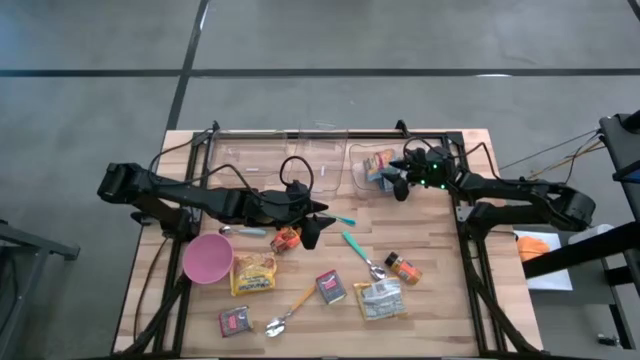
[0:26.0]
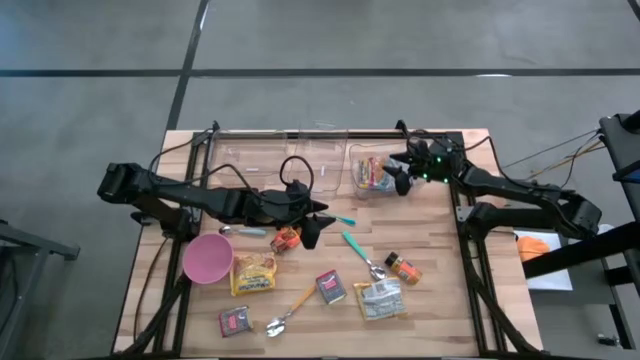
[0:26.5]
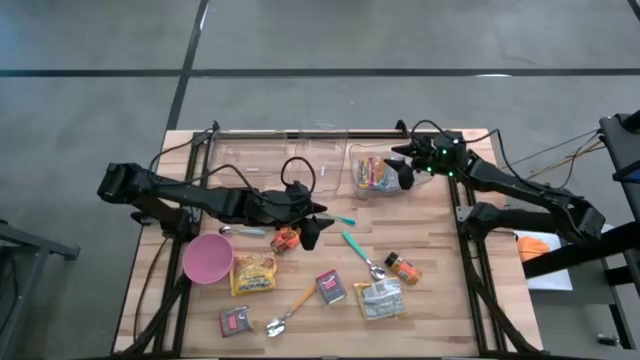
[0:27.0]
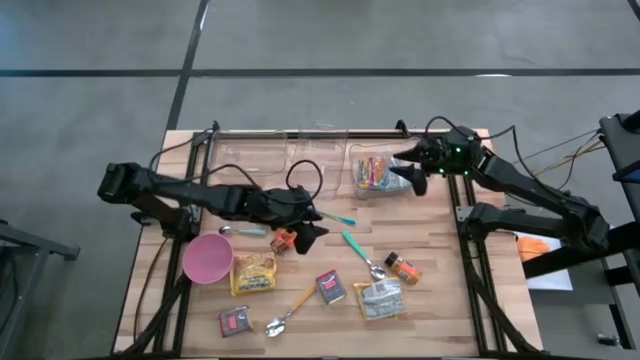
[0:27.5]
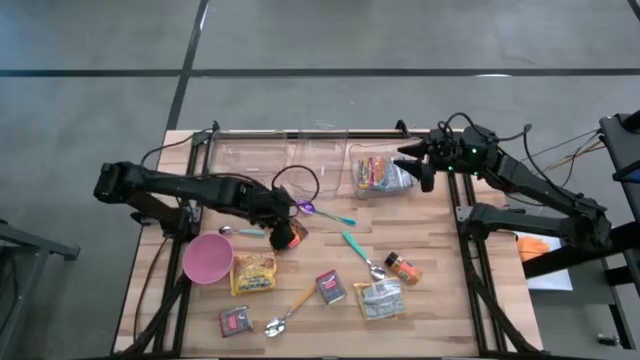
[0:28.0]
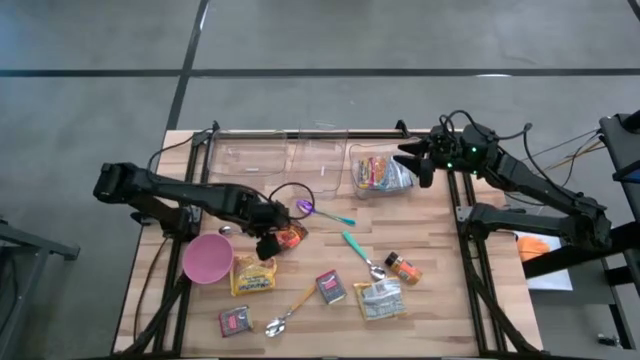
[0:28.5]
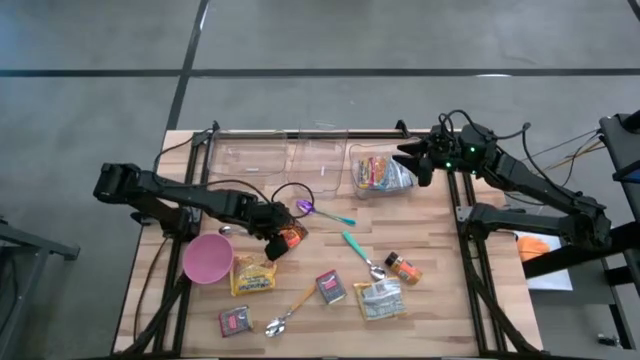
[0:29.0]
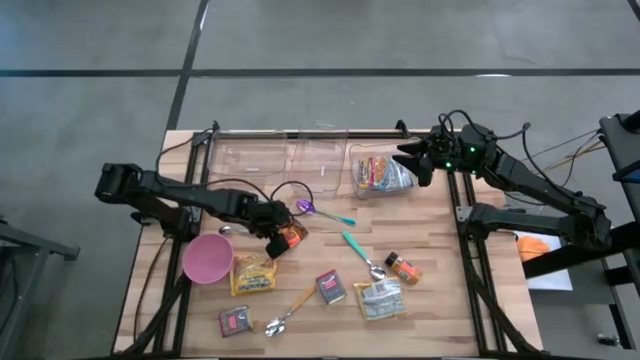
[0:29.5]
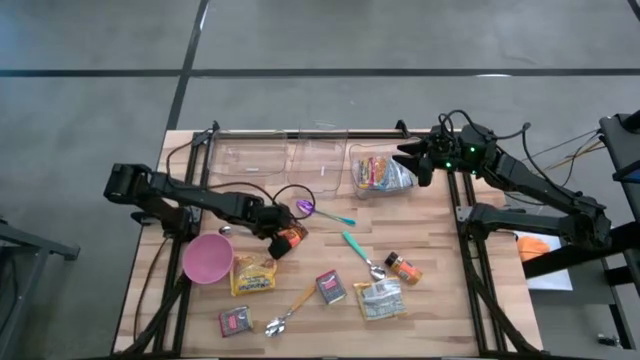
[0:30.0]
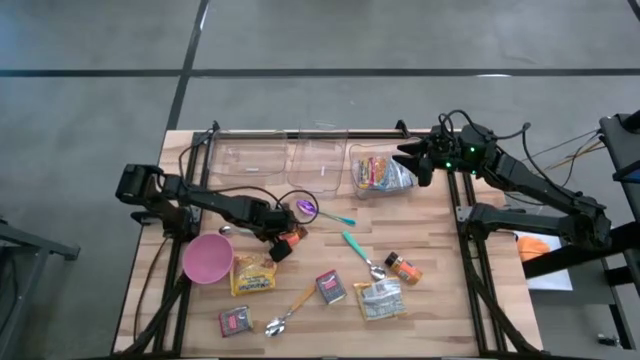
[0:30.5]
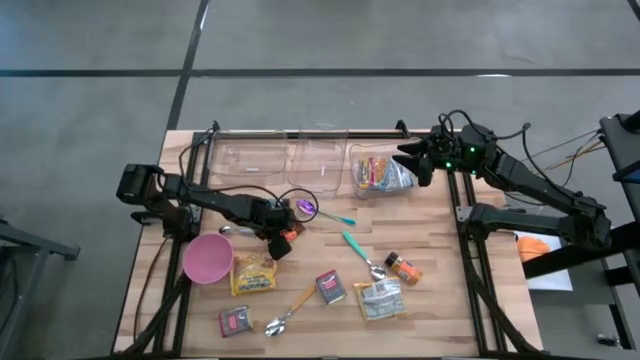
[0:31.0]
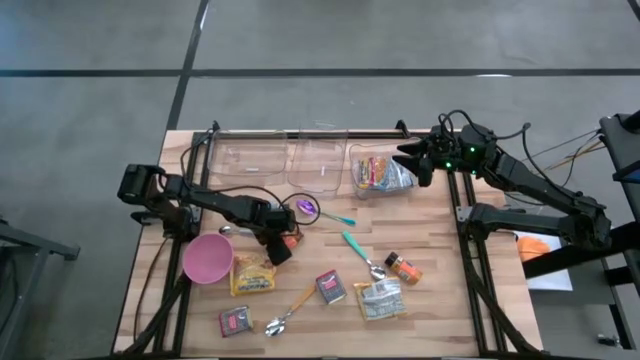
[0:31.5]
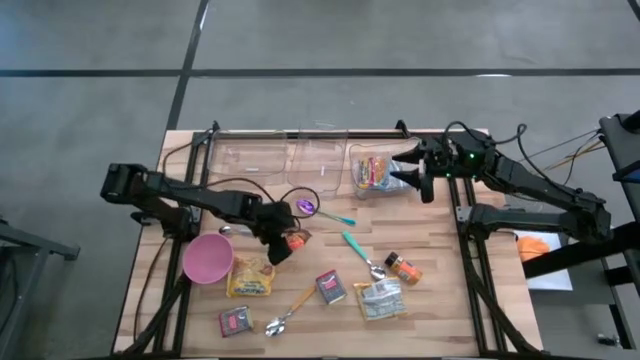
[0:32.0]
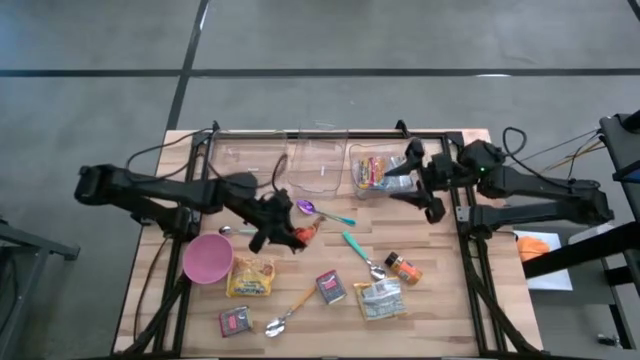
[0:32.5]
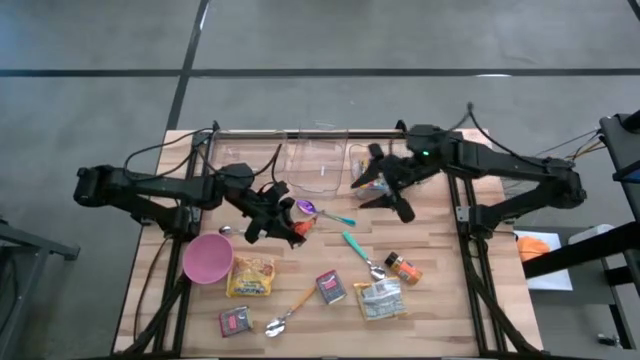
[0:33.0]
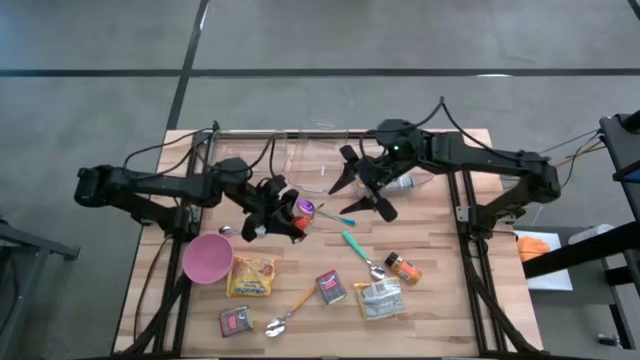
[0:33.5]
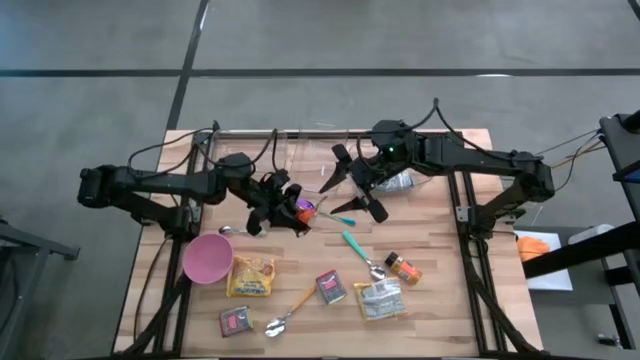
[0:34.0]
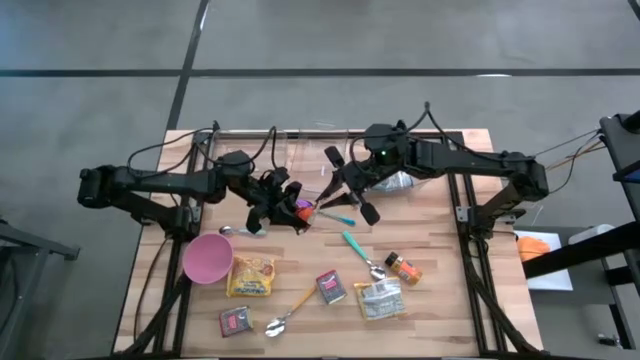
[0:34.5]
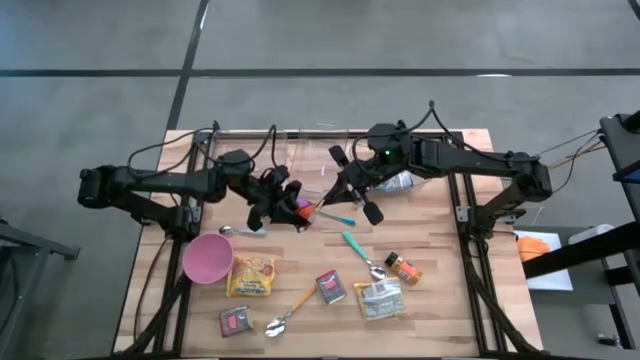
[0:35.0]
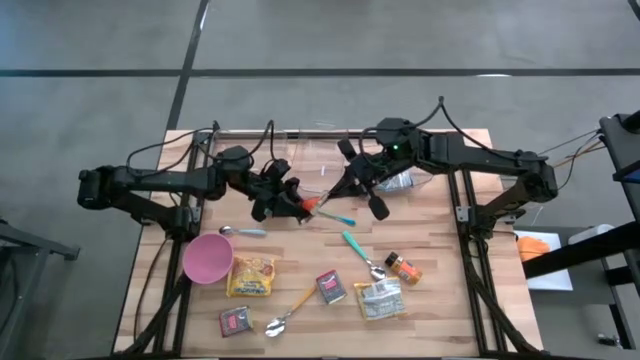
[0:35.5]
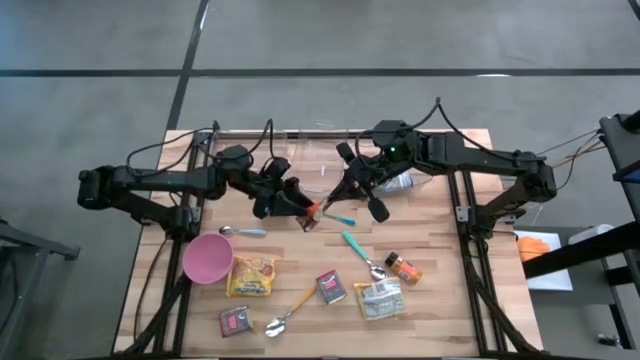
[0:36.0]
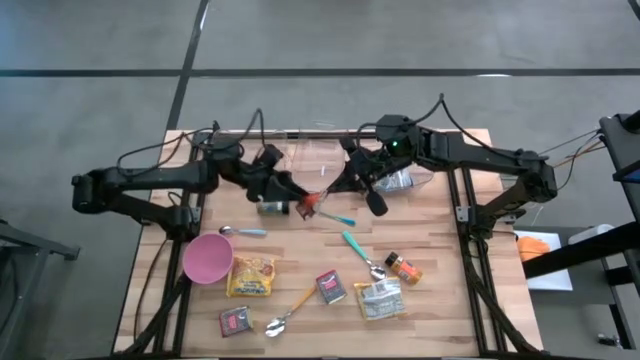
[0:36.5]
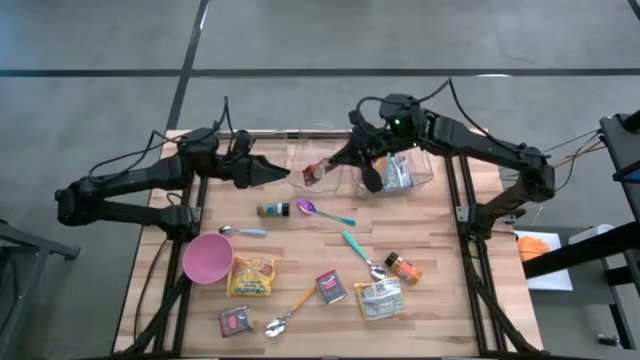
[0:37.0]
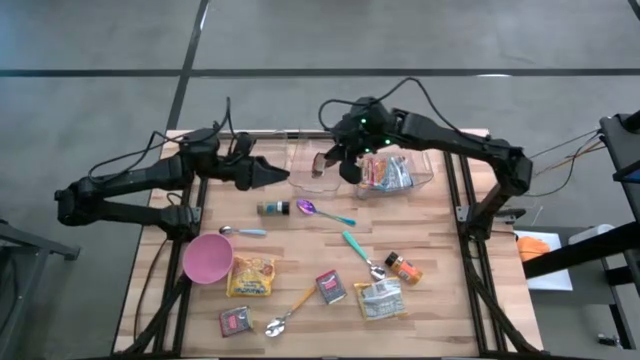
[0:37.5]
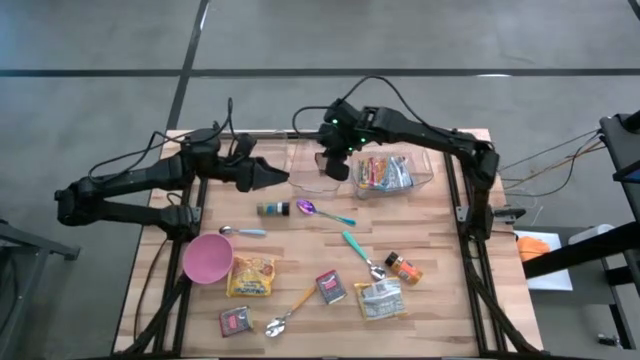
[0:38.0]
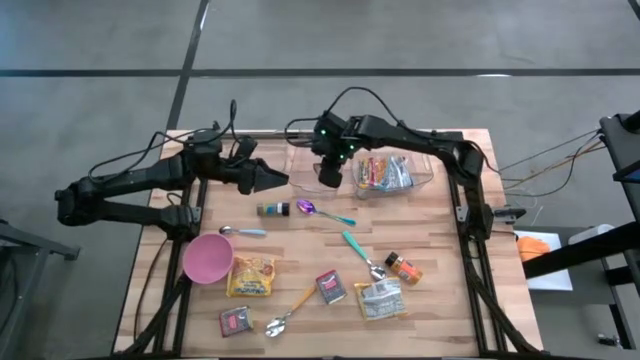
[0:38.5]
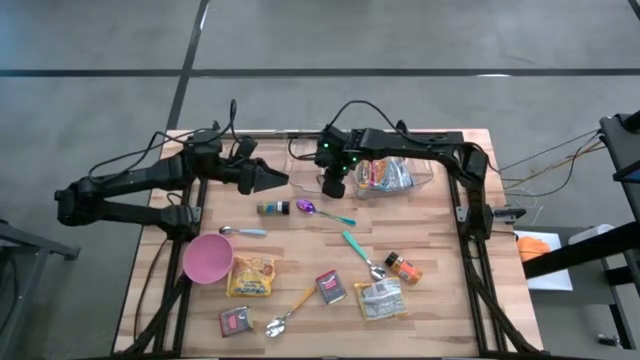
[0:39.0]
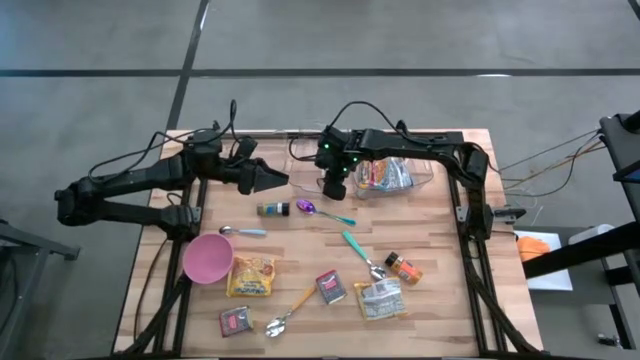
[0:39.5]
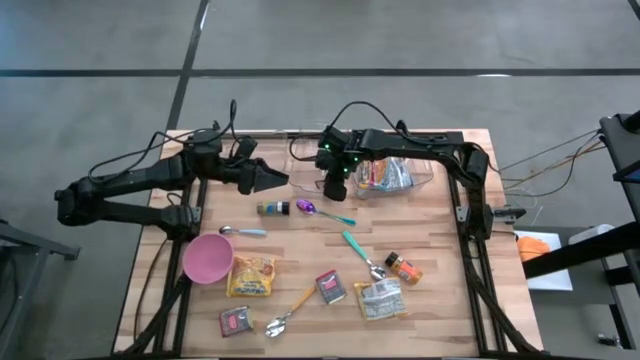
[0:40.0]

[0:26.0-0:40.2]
Put the orange seasoning pack into the middle transparent bin

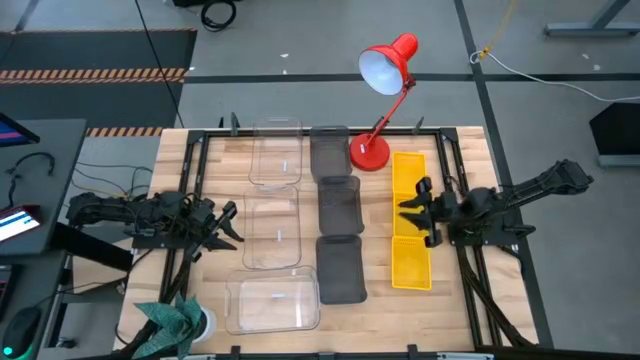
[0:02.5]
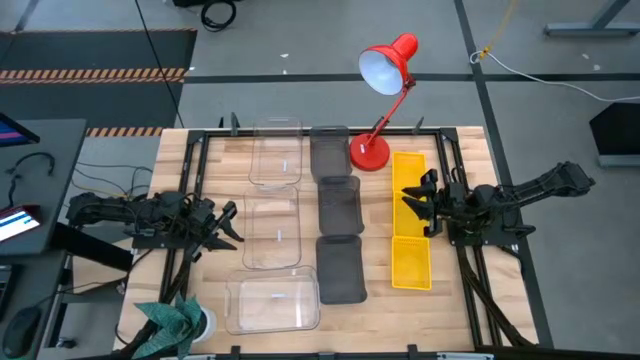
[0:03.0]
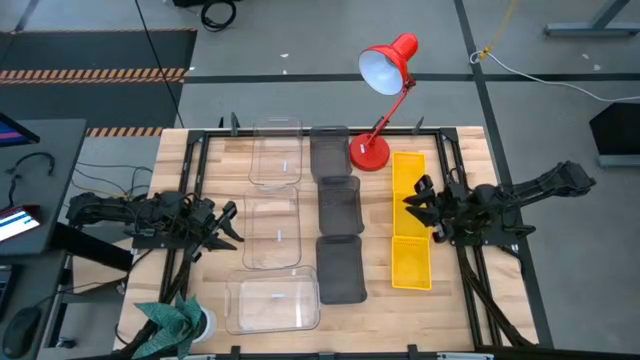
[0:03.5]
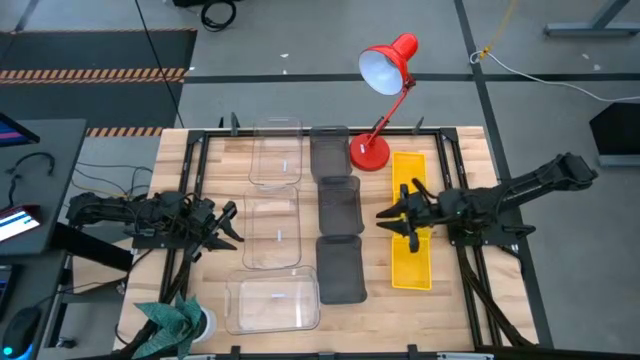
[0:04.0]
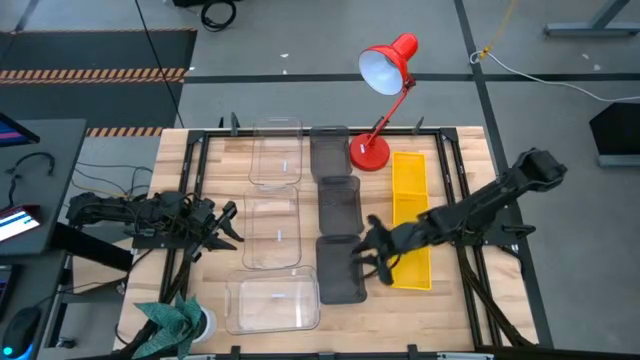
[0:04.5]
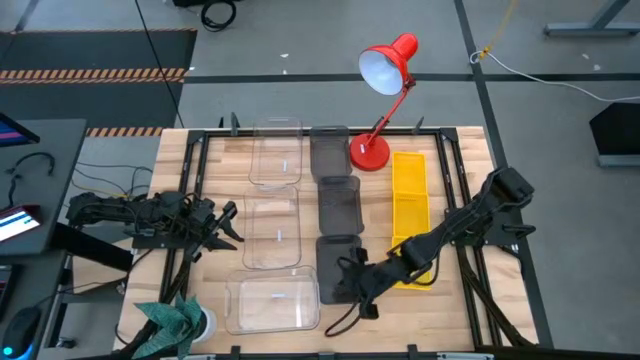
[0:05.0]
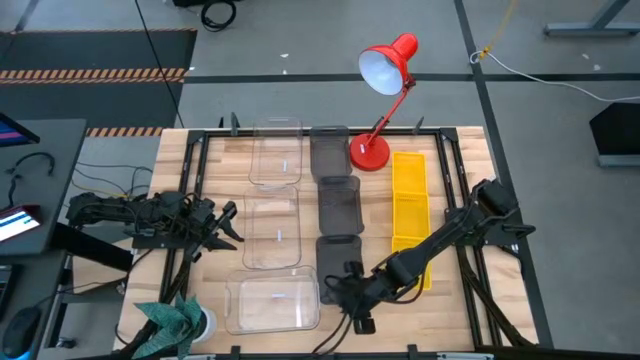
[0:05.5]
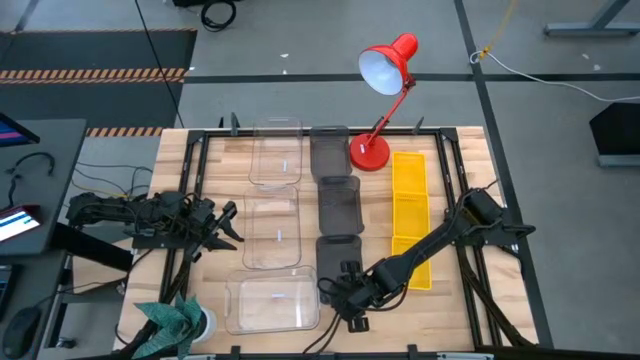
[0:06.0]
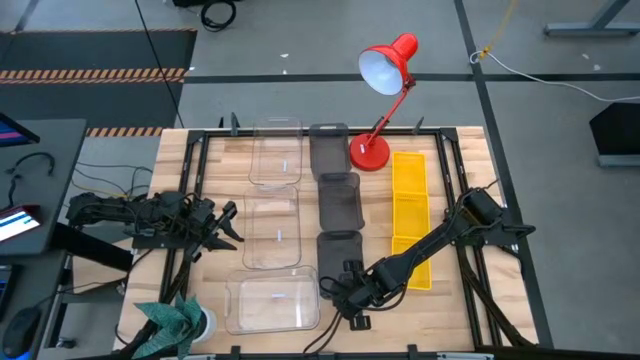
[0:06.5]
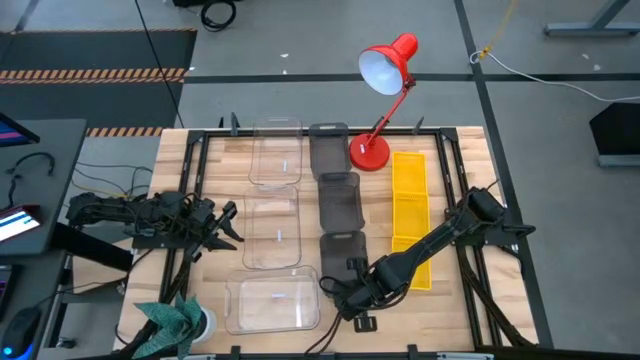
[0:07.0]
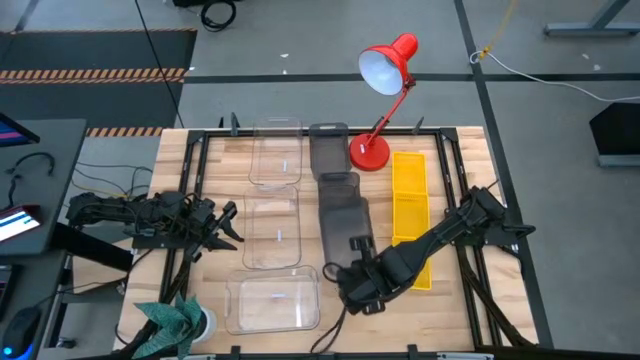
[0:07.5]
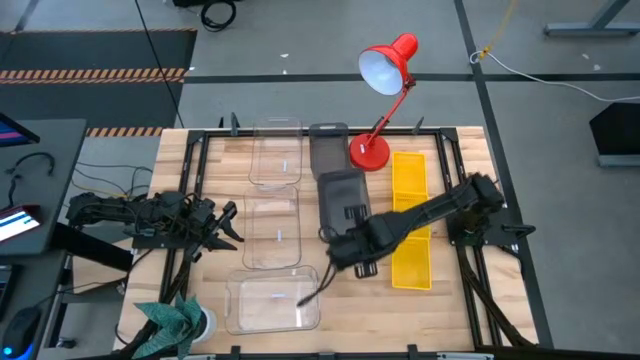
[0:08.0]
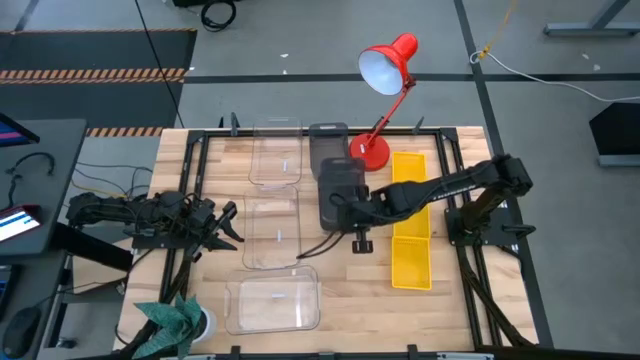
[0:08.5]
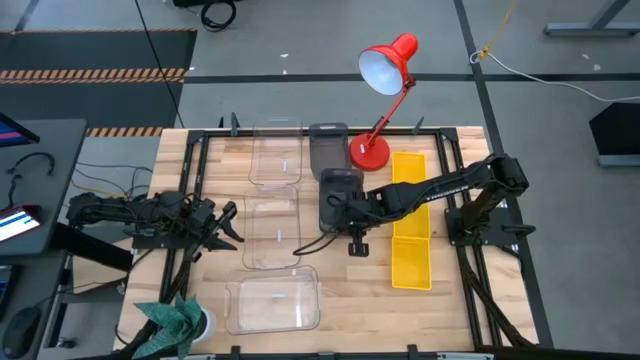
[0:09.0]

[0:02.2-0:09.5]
Stack the bottom black bin on the middle black bin
